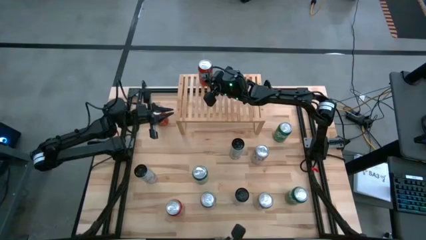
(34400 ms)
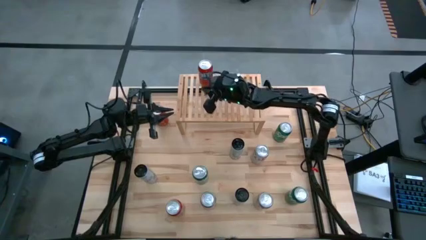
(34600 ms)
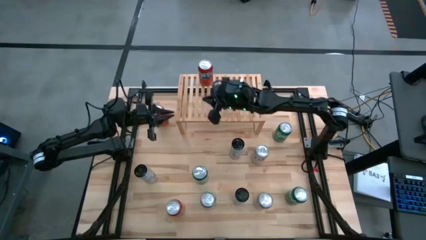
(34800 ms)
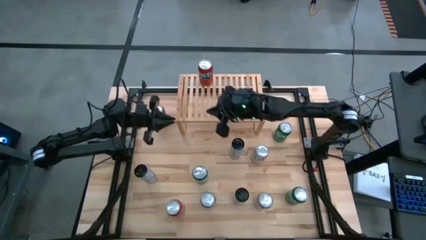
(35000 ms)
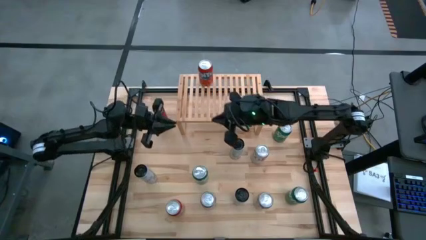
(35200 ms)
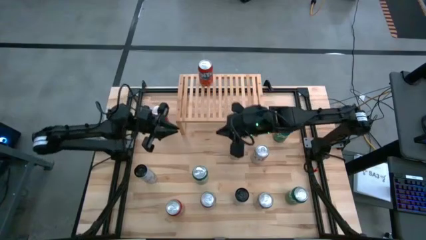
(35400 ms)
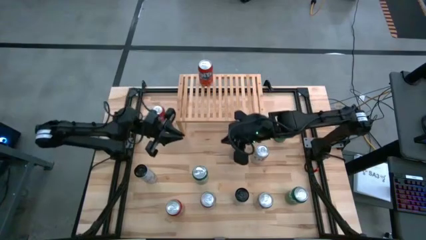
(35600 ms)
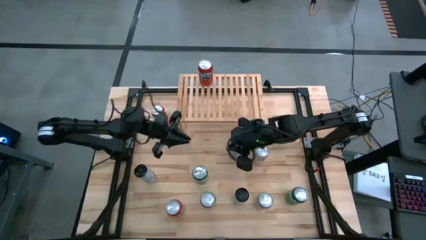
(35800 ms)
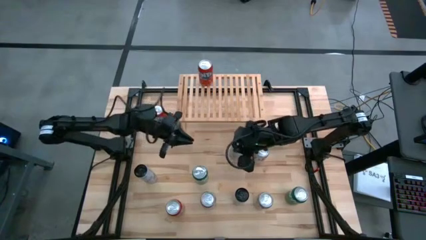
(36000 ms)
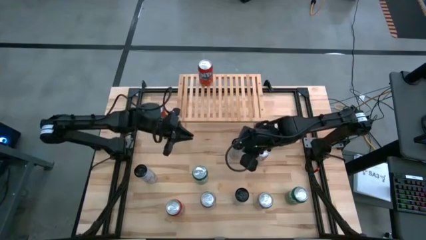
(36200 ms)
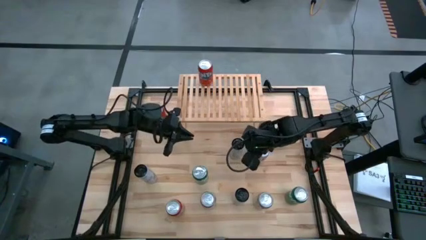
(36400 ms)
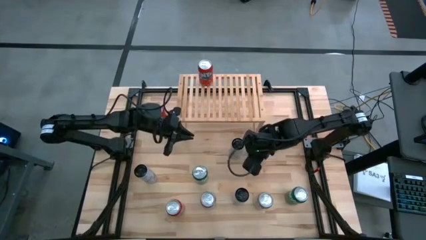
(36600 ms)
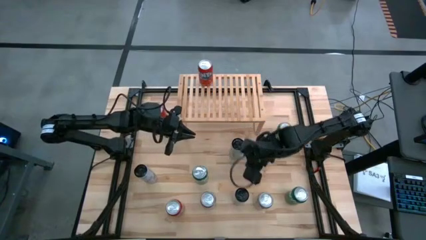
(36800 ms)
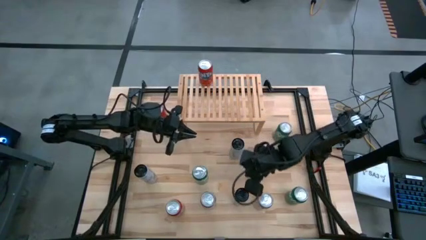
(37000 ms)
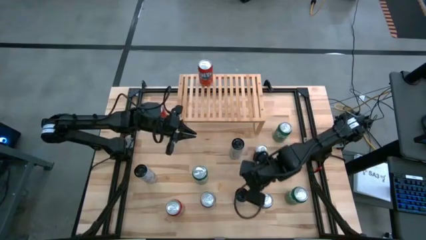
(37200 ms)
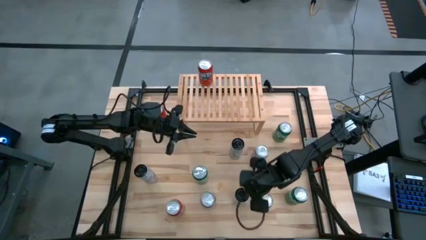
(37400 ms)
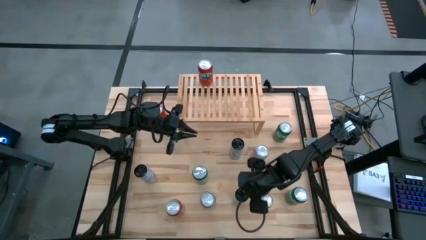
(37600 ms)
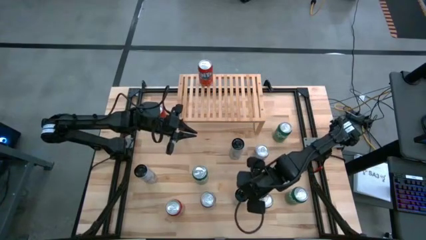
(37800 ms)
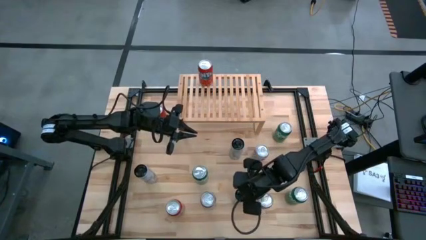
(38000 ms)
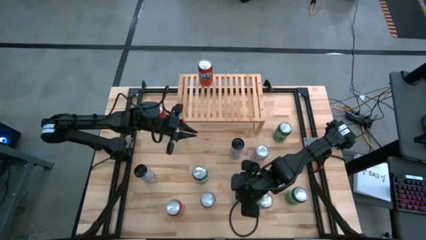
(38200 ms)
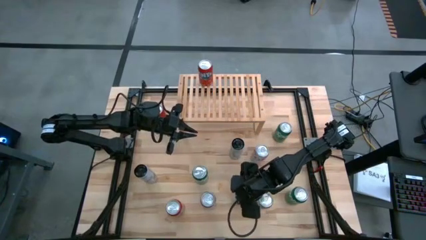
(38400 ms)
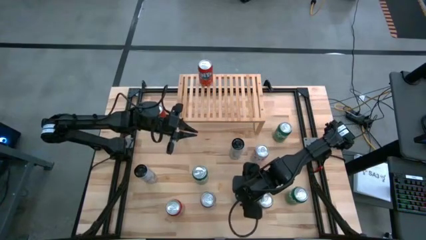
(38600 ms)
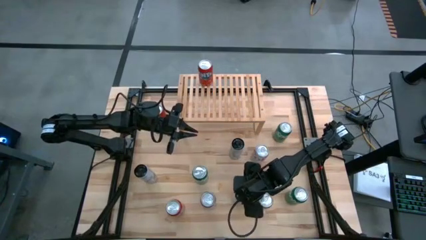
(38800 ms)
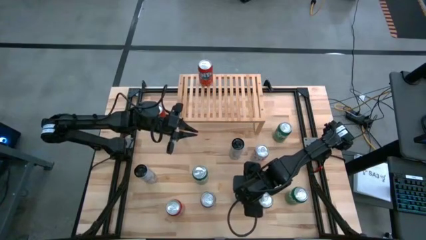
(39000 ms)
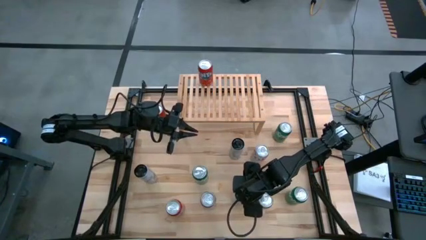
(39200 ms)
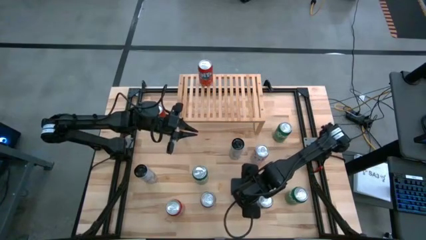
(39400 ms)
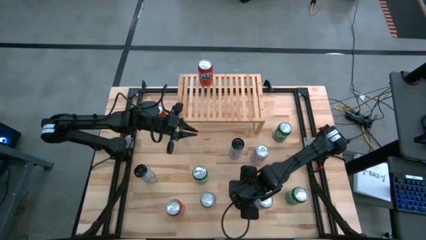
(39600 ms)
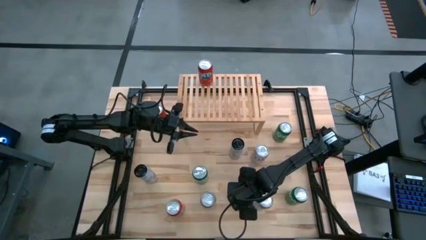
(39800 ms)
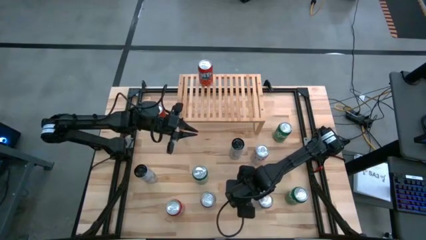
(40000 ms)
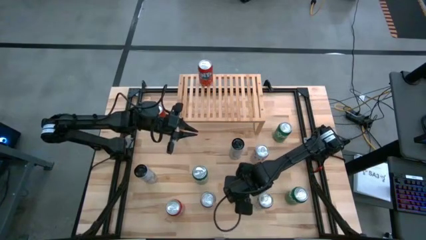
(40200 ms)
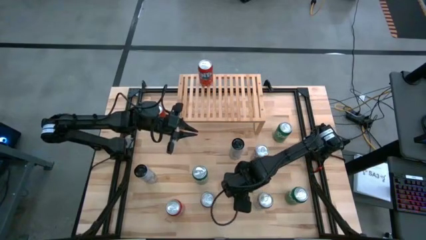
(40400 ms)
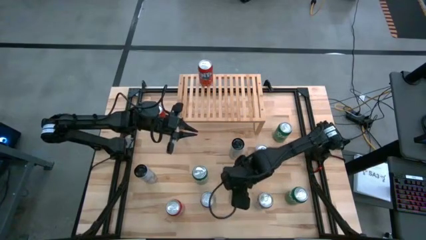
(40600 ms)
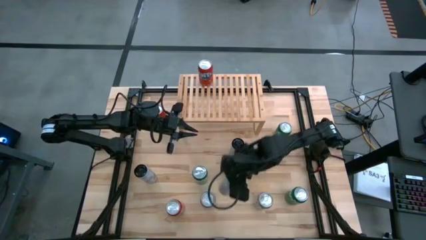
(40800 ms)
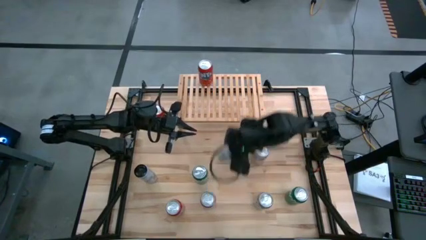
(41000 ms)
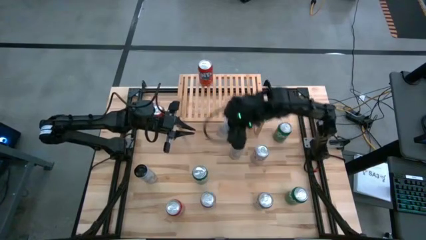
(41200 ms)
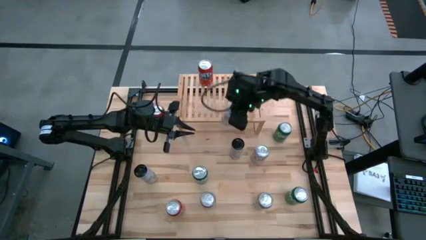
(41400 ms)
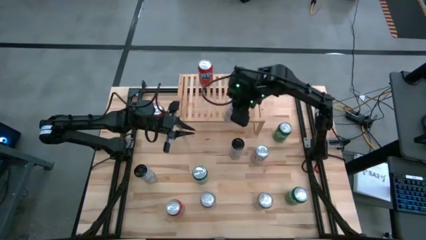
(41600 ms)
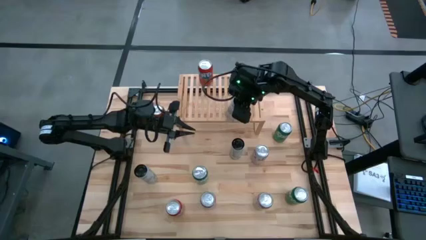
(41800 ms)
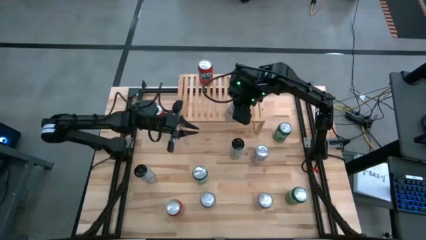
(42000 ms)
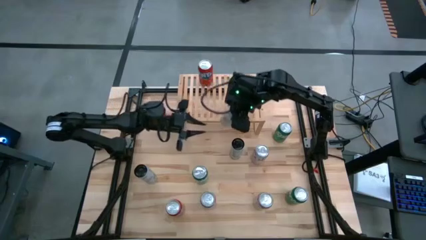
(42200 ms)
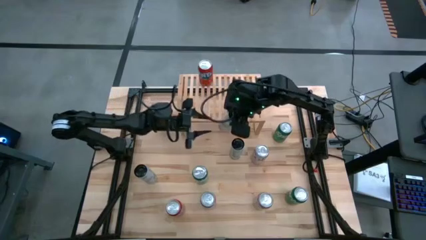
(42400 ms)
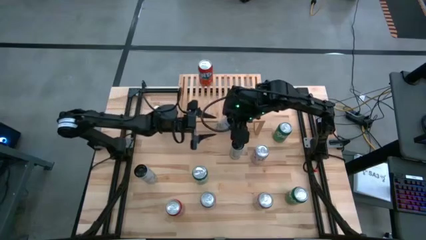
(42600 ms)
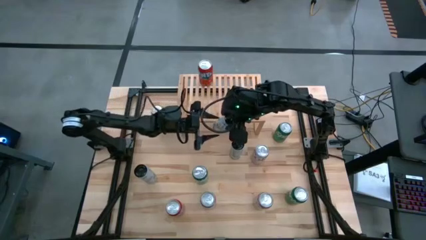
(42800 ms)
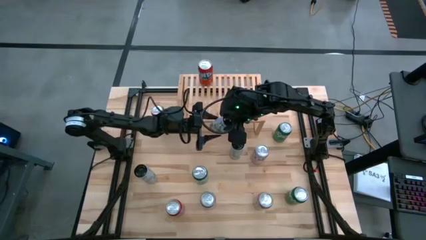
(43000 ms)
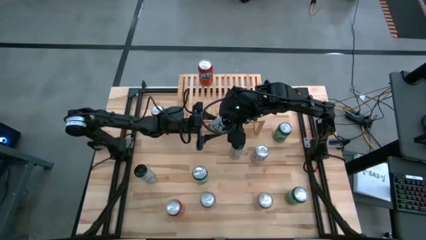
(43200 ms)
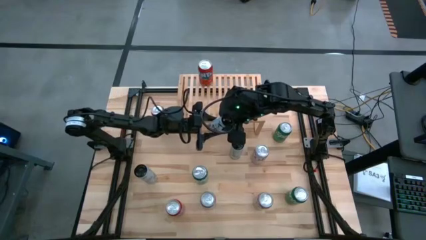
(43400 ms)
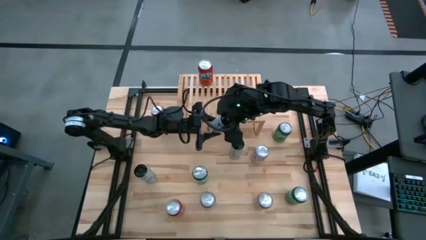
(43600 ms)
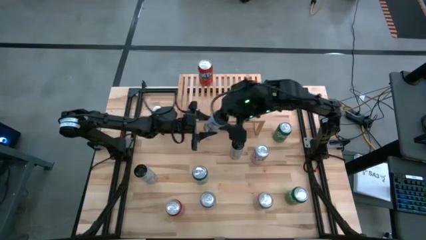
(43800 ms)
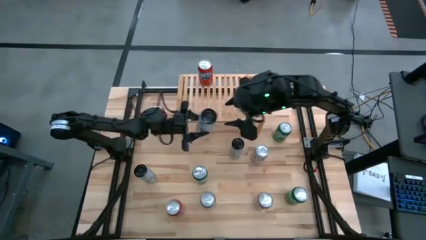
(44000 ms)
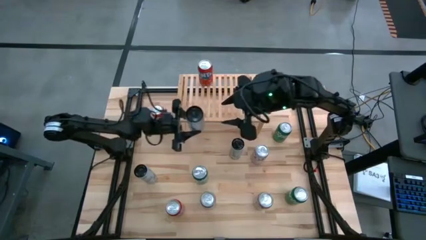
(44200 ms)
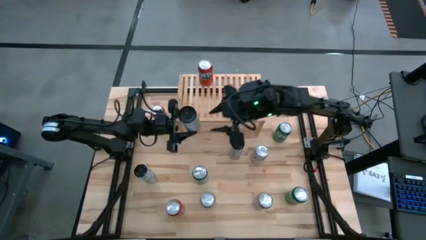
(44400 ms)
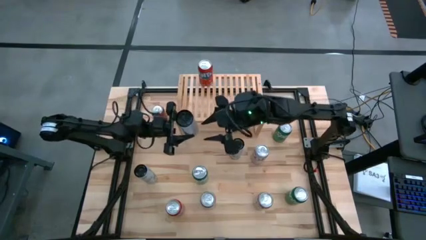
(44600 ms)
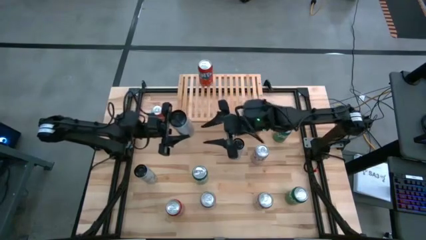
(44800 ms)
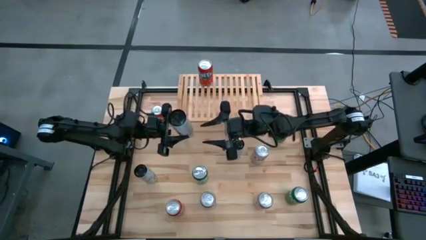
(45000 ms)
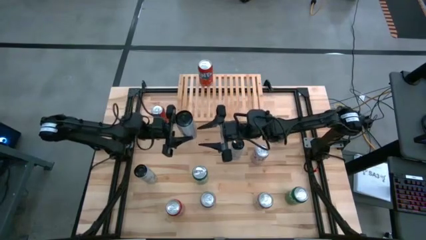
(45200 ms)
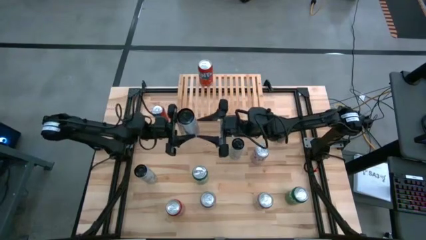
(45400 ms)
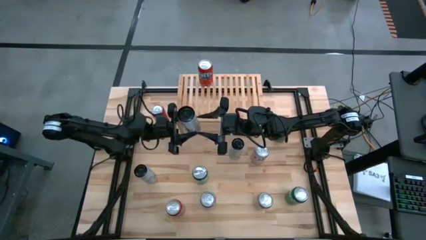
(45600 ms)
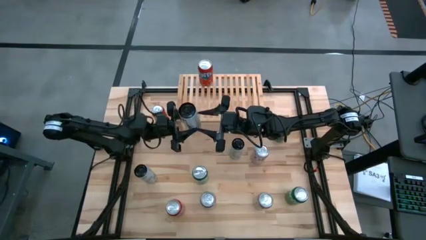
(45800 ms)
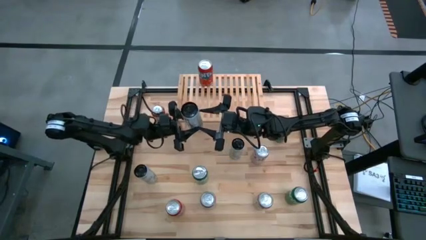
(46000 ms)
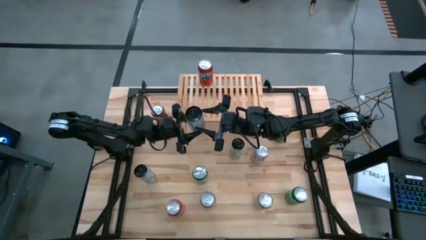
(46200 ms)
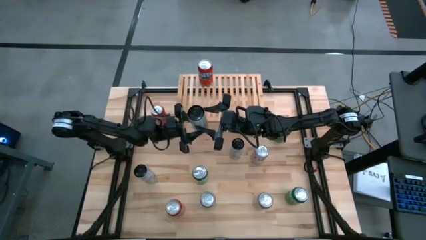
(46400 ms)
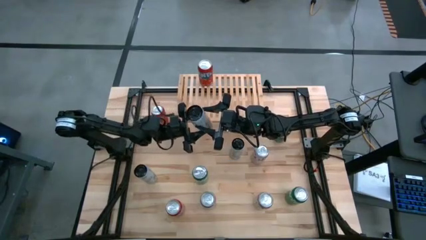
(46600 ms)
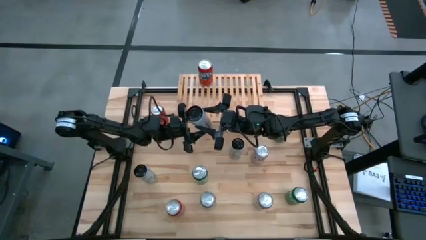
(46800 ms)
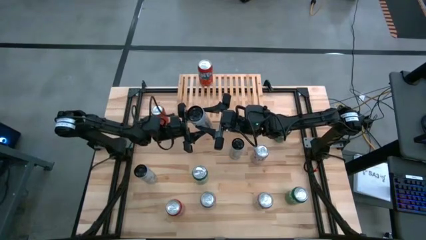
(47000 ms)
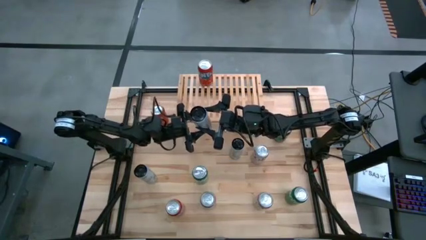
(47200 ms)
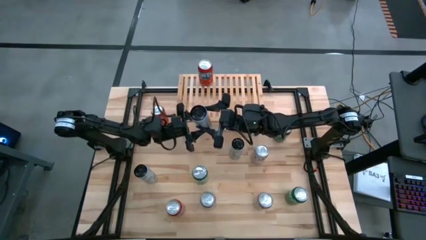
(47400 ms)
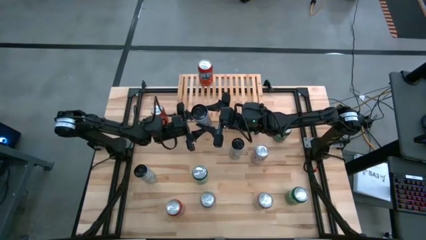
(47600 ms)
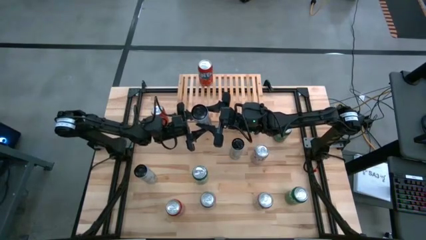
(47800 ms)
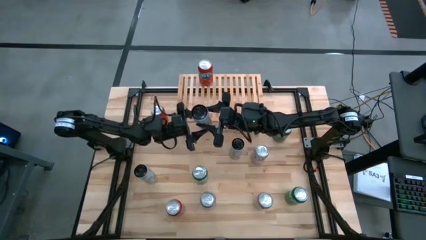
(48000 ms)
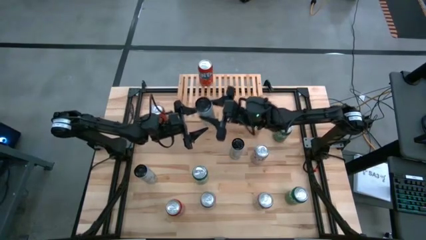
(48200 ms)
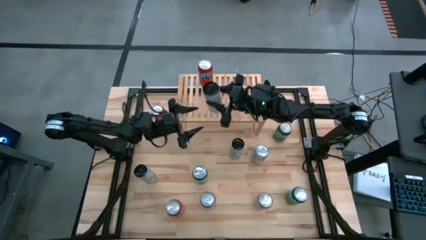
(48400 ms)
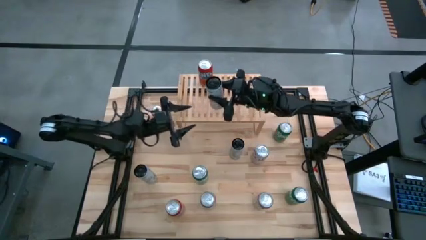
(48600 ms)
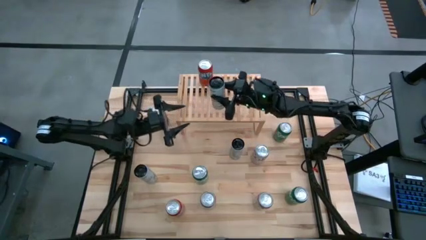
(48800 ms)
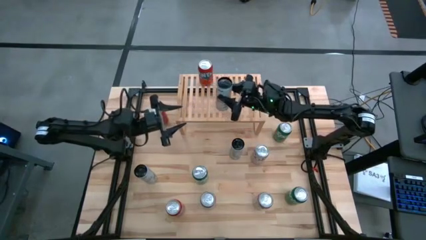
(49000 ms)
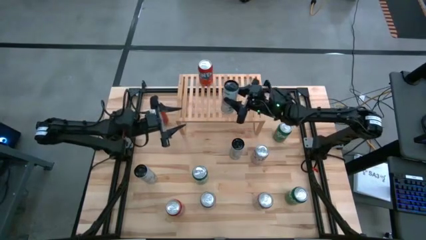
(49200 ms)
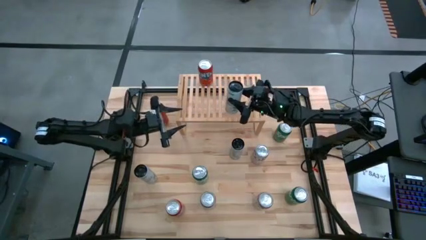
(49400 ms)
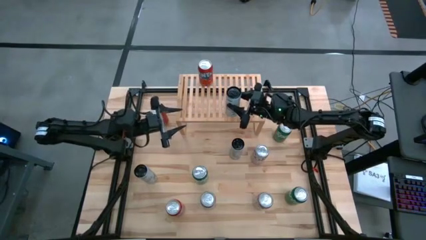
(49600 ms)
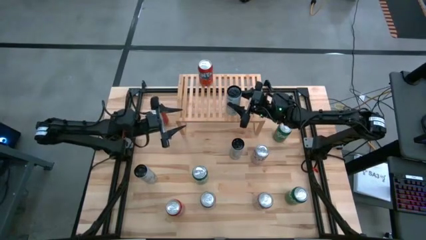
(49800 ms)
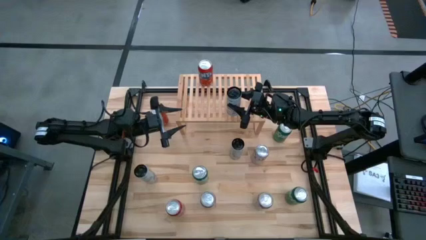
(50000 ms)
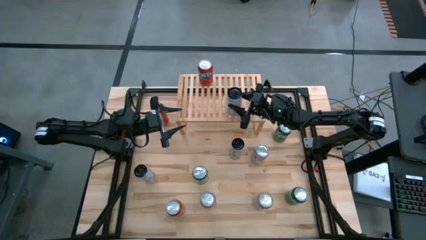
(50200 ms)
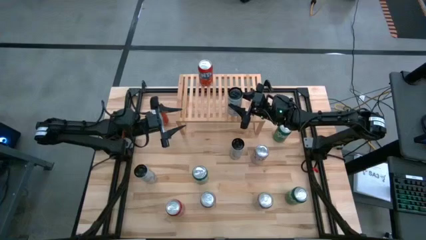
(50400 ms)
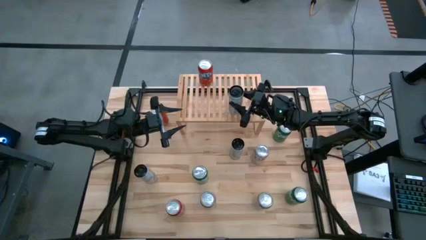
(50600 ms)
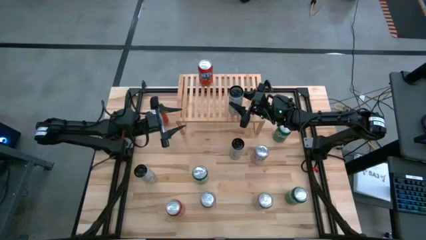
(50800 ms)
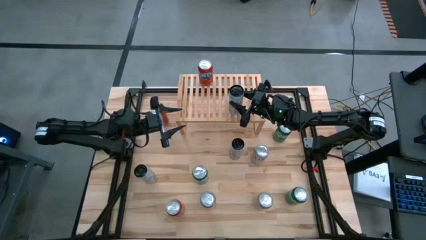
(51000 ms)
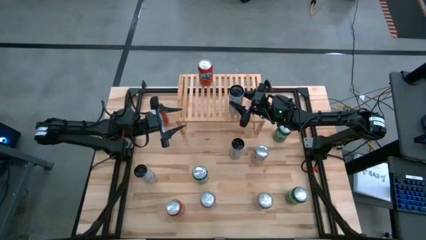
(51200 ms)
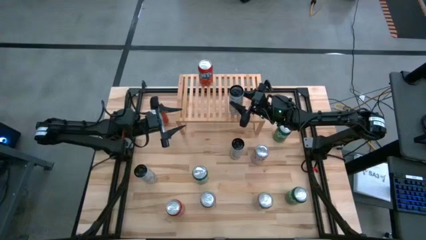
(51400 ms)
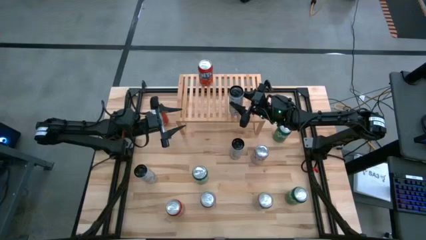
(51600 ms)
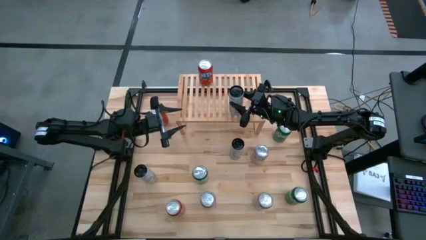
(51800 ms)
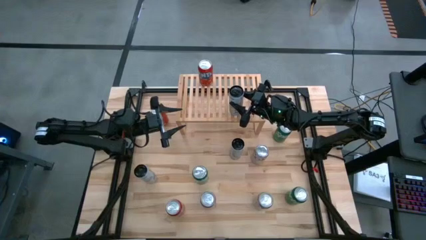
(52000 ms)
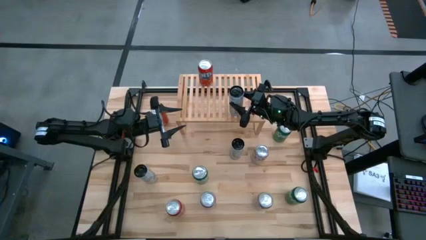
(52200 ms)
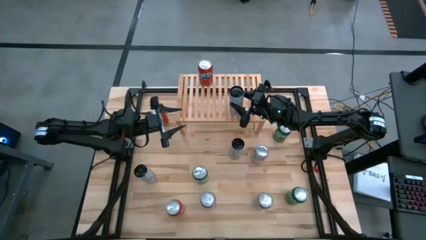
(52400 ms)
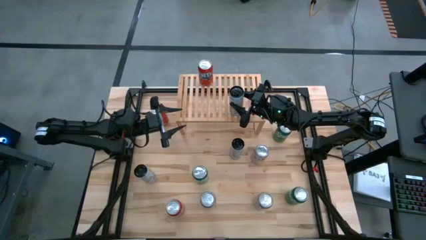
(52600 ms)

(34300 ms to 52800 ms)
Task: Place canned beverage on shelf
Put the white blue soda can on the shelf
